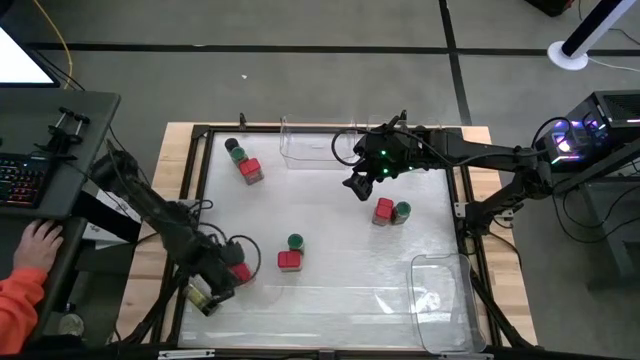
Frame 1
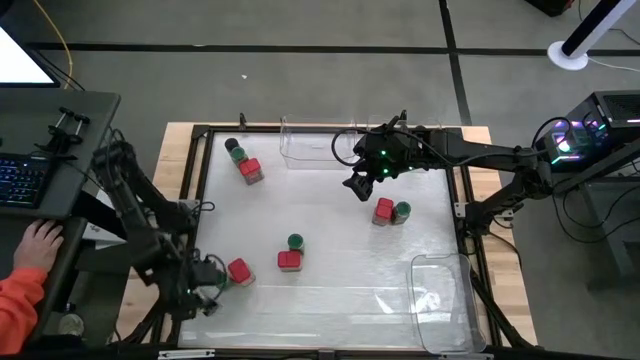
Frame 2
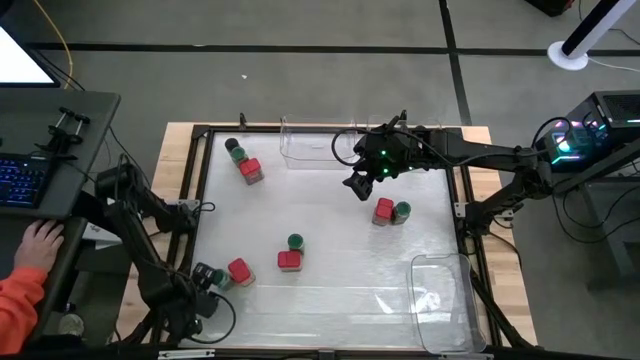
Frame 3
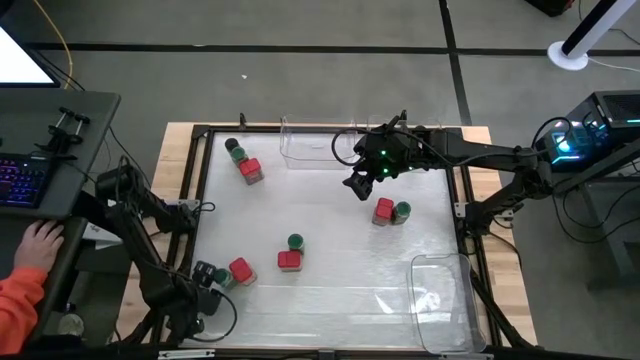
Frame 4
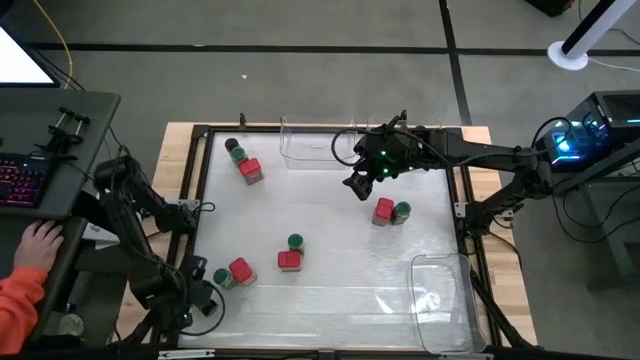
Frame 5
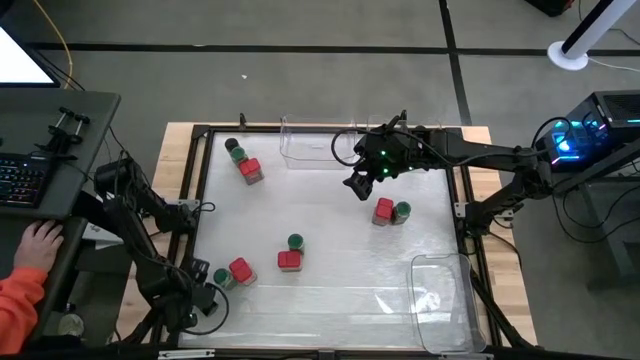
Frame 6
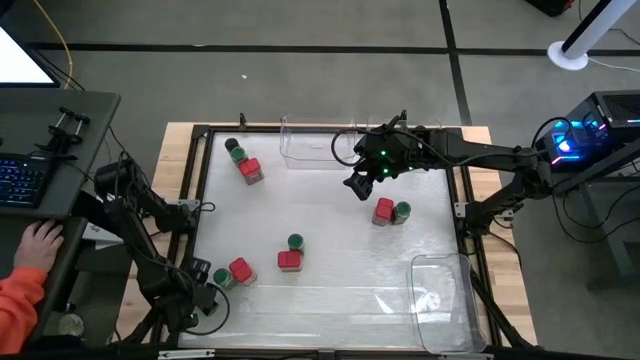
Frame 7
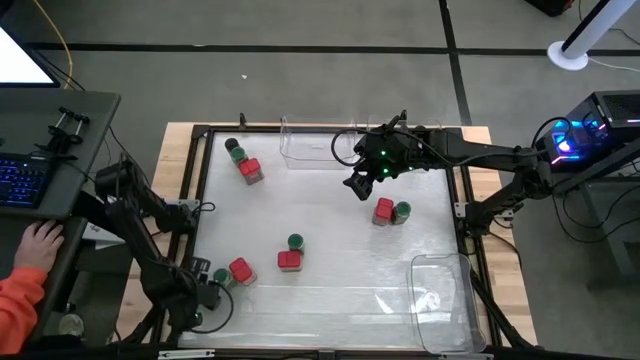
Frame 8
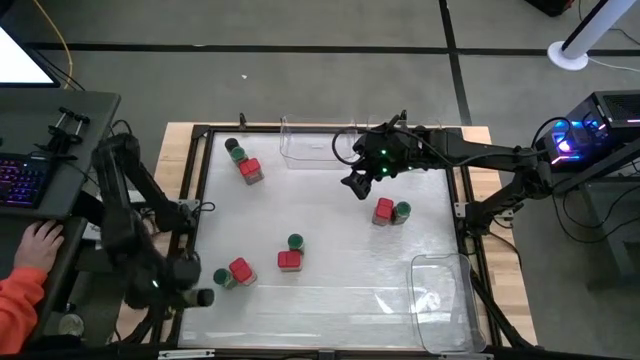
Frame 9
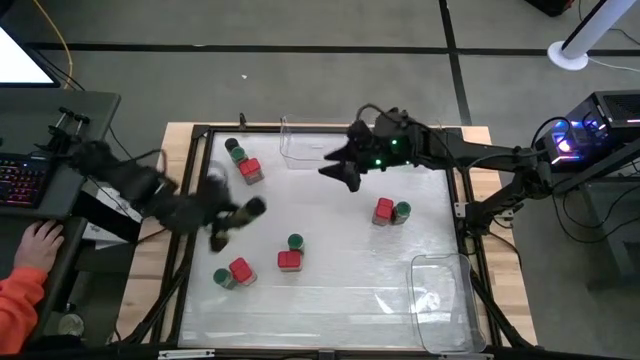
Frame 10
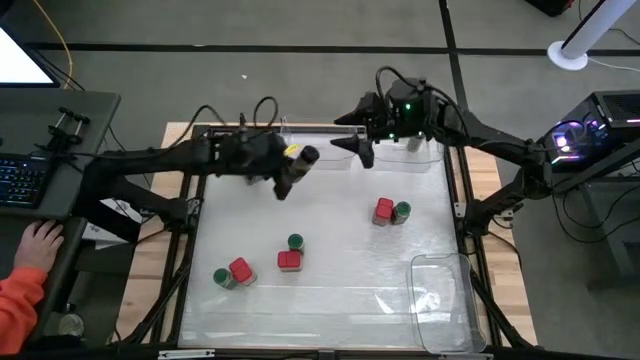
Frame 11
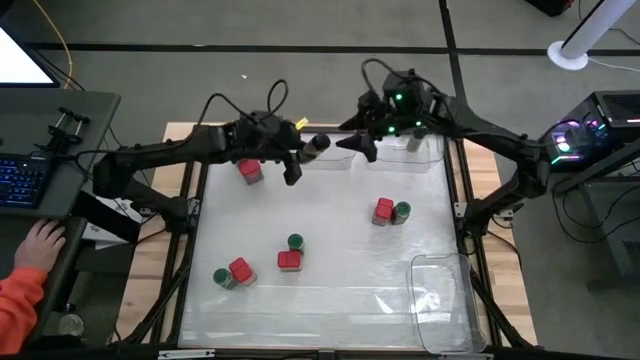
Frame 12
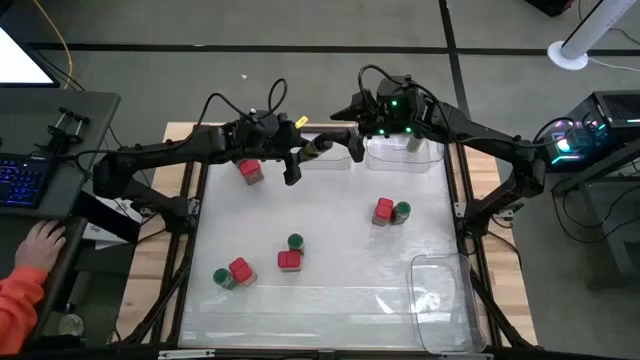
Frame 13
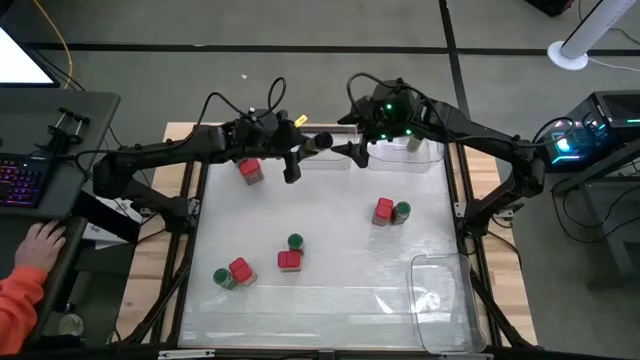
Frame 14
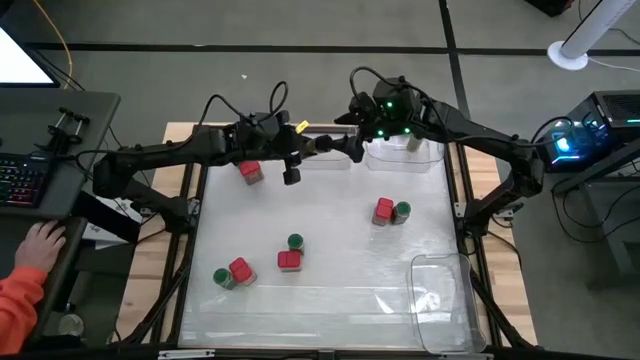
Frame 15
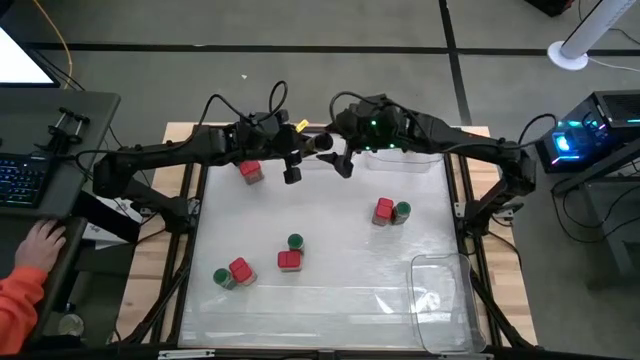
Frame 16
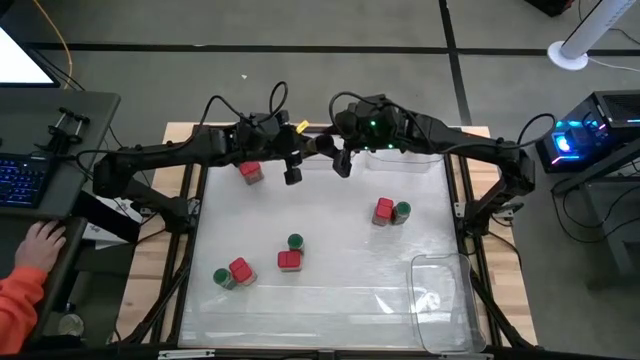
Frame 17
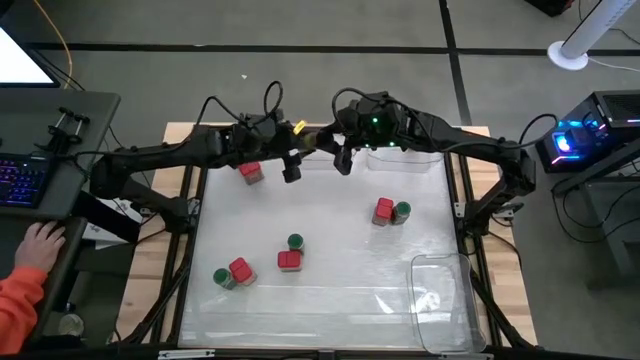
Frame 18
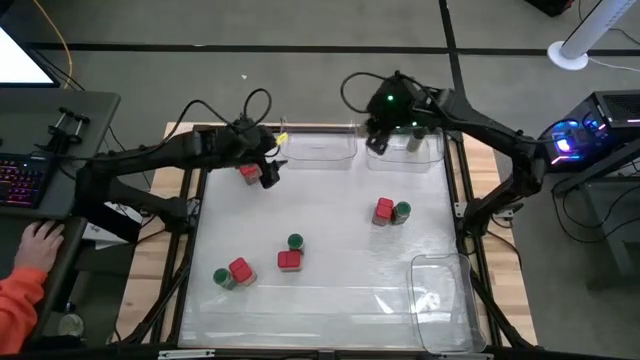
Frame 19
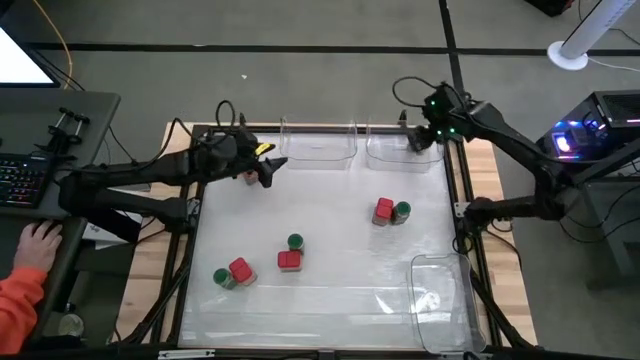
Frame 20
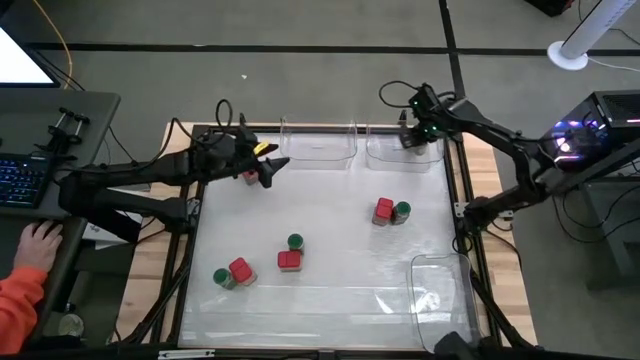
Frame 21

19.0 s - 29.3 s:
Task: Sort spices by type
Put the black seasoning bottle into the top right transparent bin

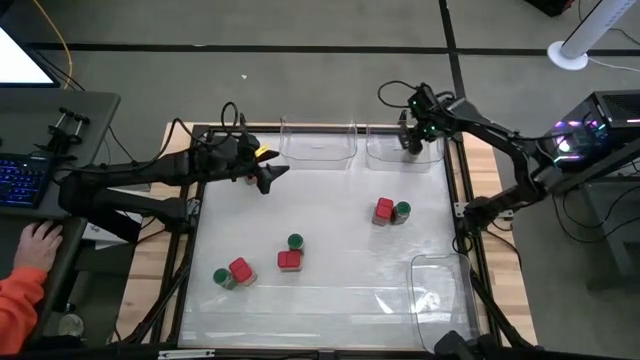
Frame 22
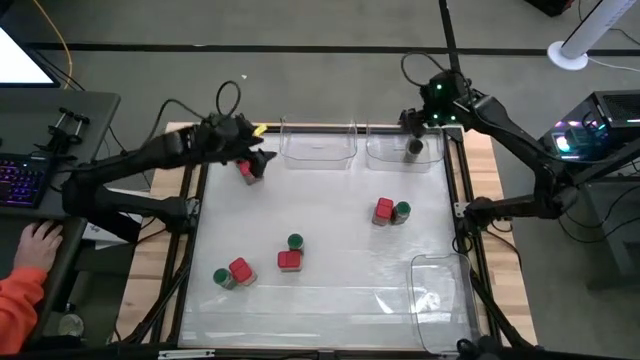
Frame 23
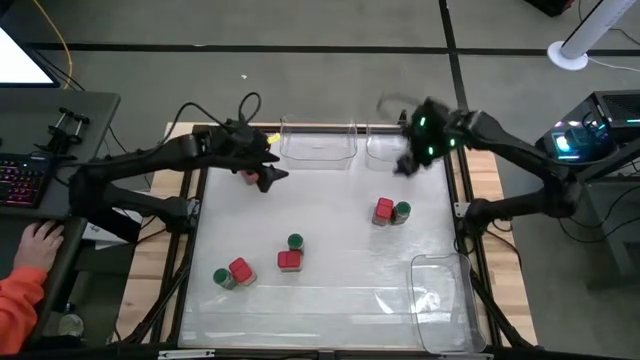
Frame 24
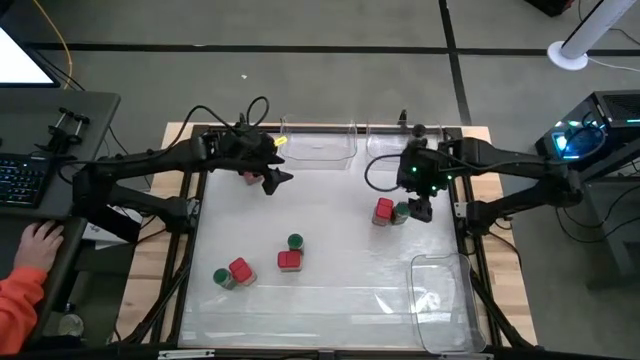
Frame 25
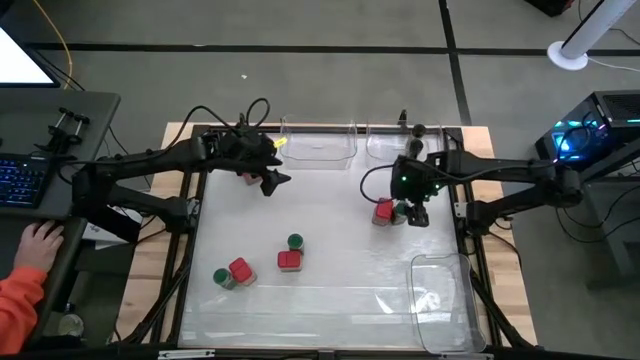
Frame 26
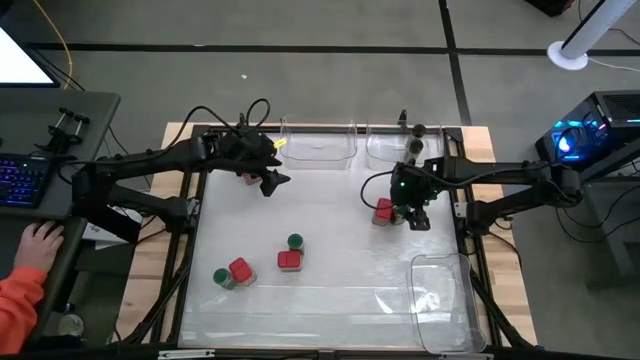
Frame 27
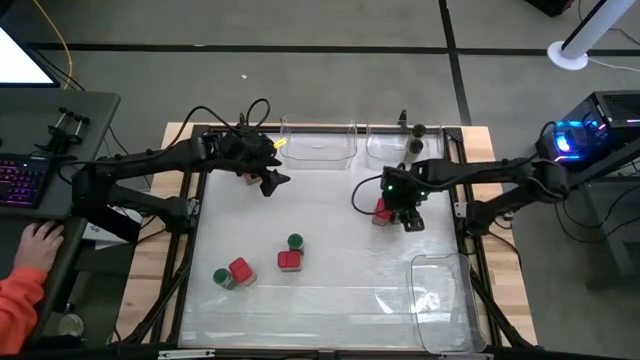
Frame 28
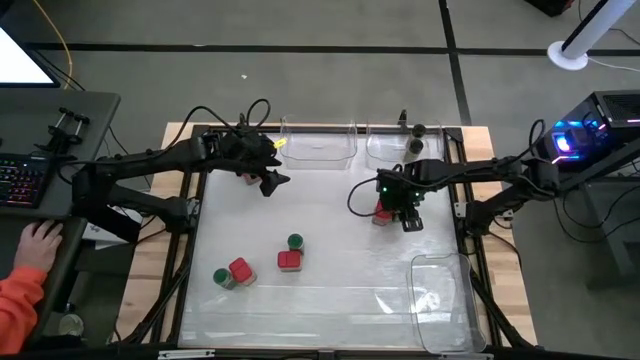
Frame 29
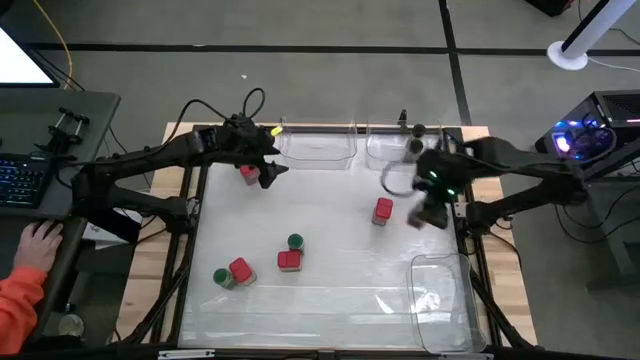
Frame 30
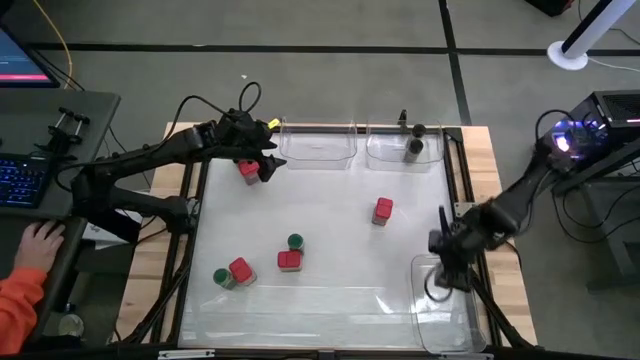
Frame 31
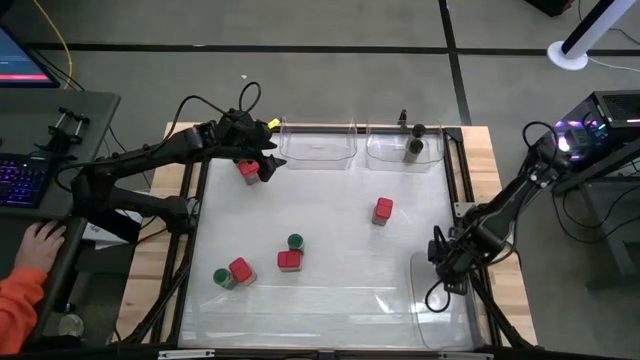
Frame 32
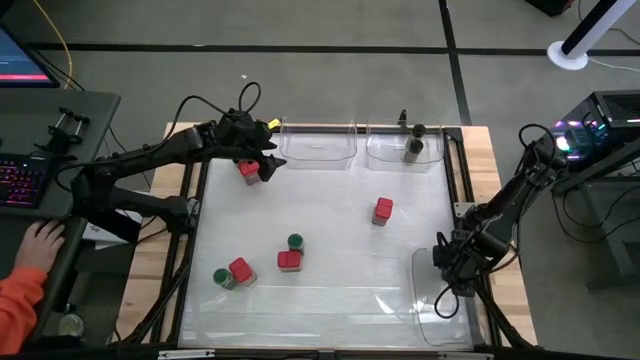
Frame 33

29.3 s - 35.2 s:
Put the green seasoning bottle into the bottom transparent bin

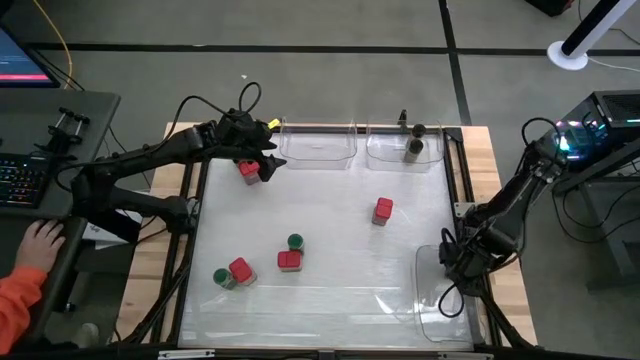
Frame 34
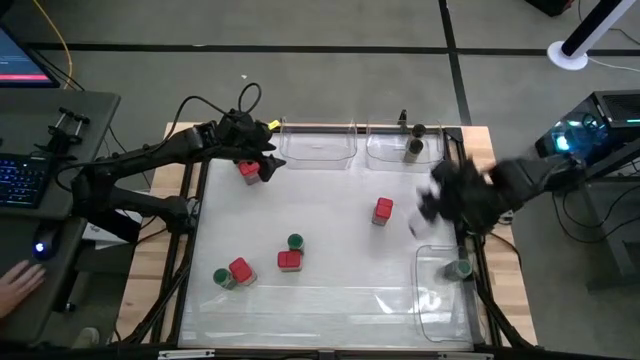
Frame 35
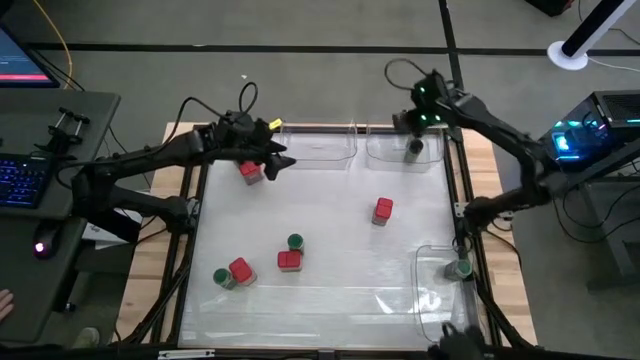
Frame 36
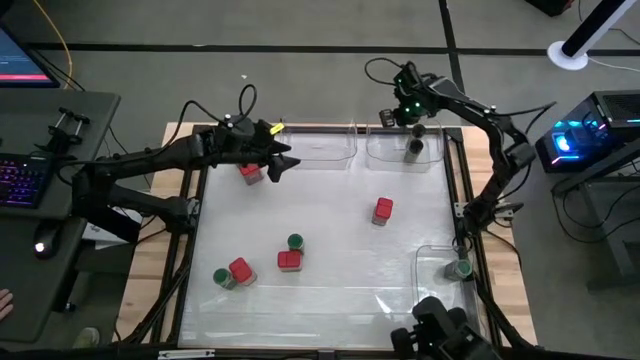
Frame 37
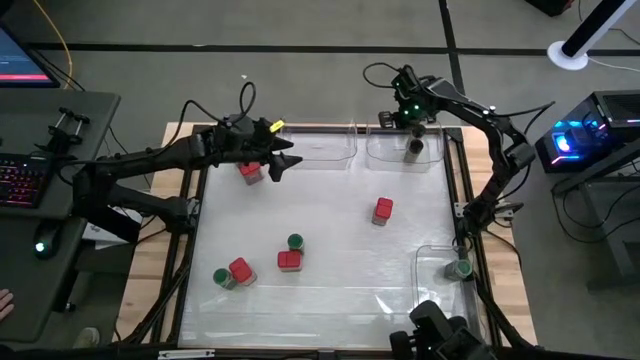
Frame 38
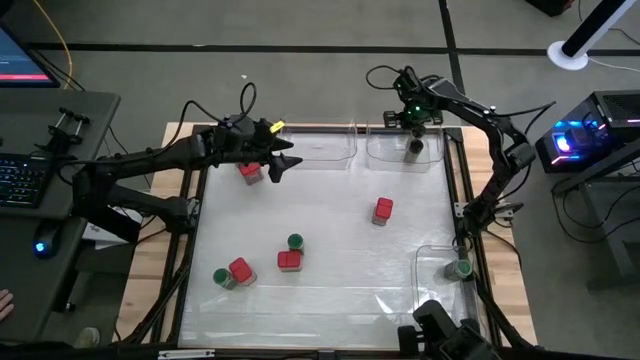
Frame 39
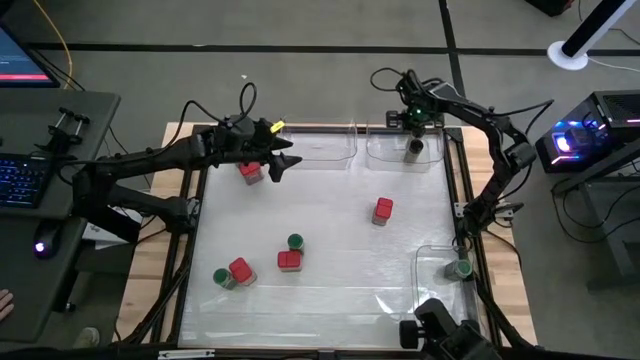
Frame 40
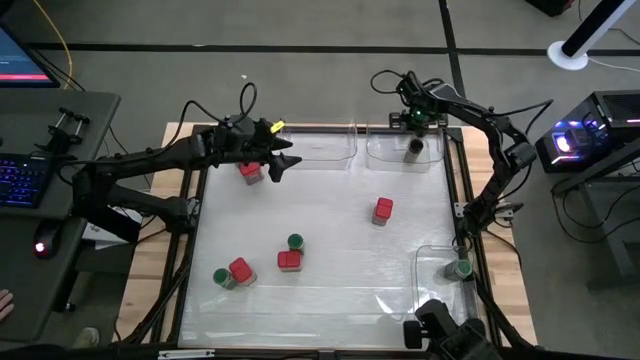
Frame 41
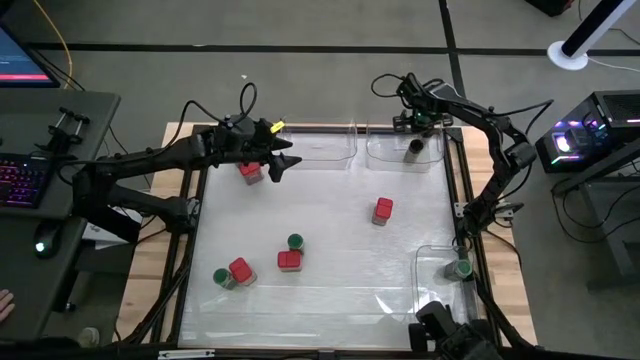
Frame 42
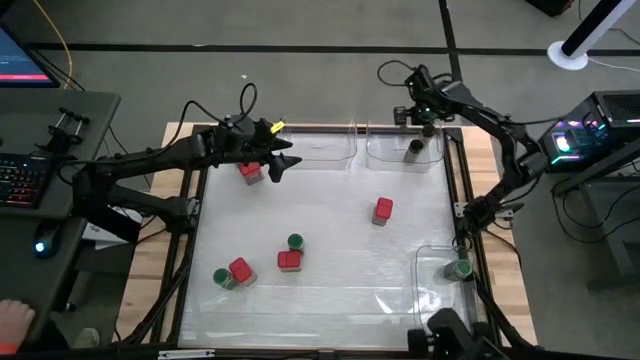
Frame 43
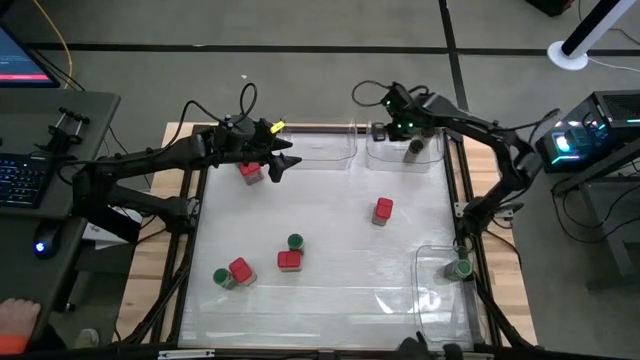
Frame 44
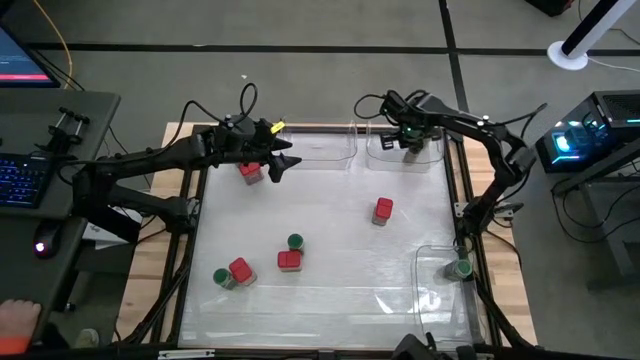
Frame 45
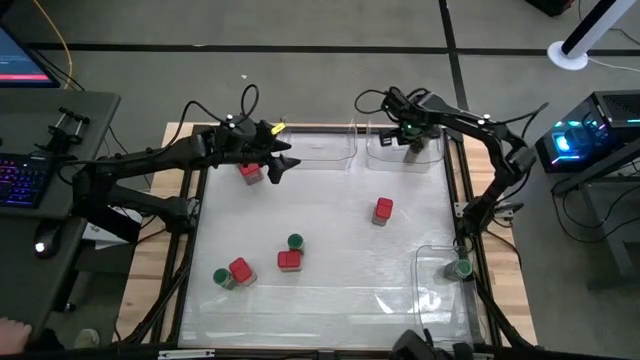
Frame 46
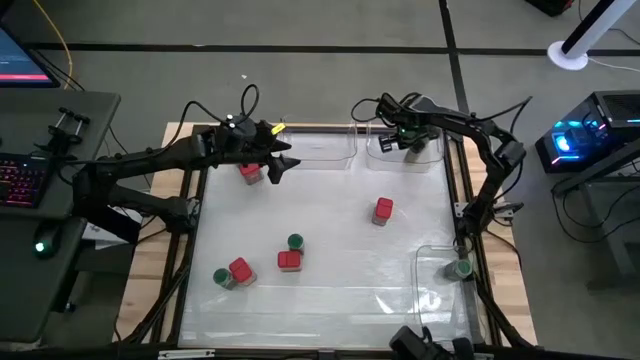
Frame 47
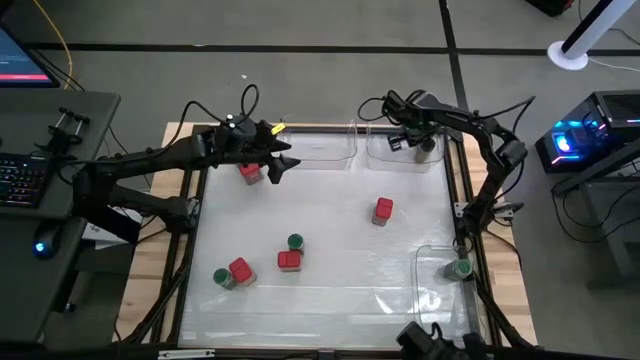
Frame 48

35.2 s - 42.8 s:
Adjust the black seasoning bottles inside the top right transparent bin
